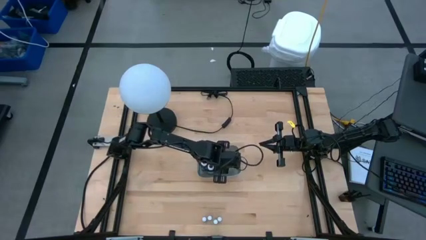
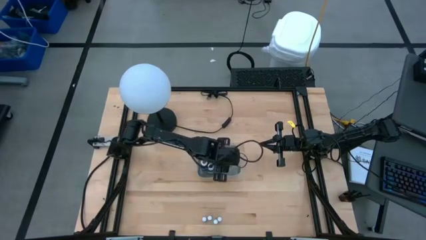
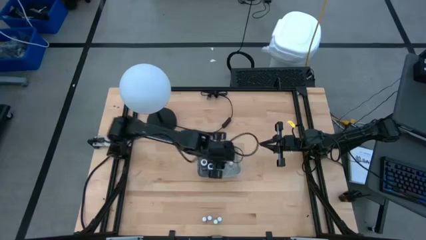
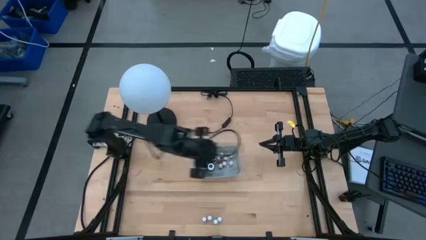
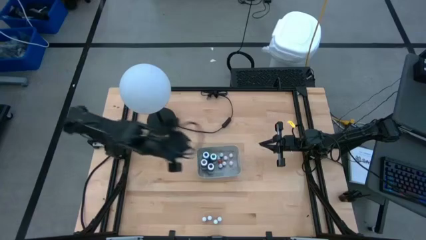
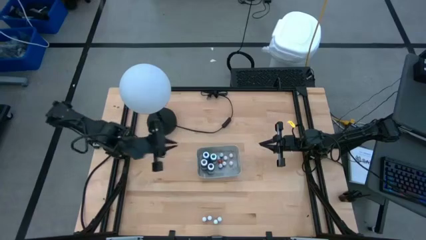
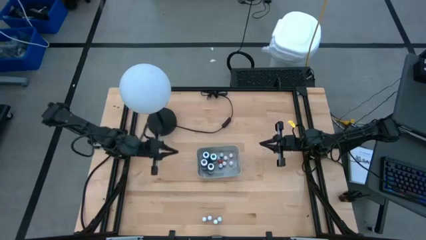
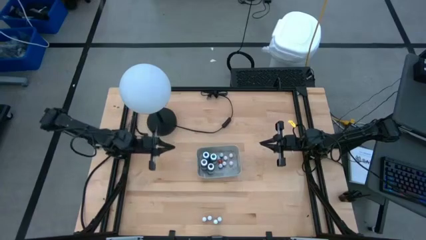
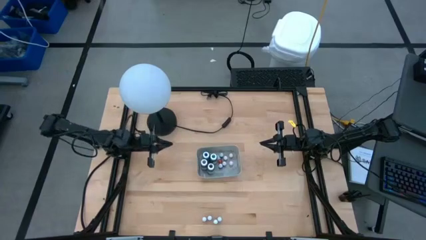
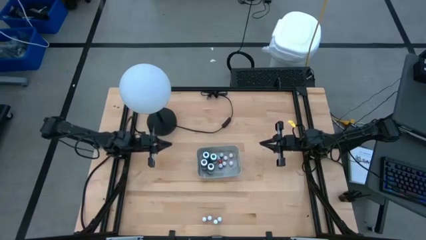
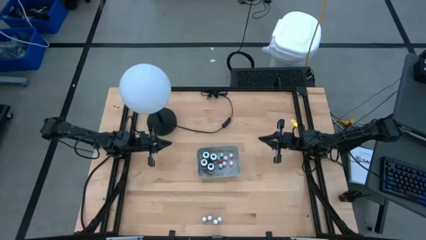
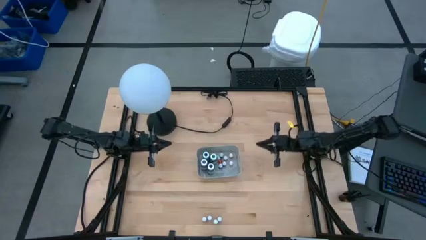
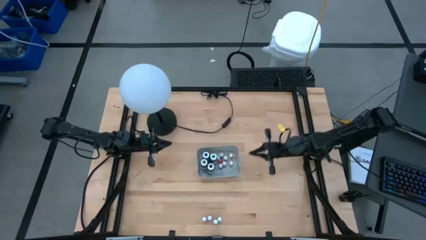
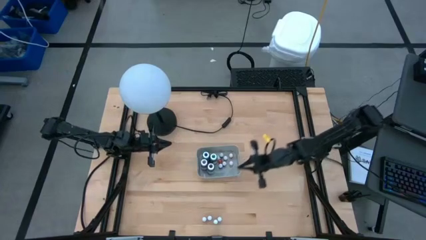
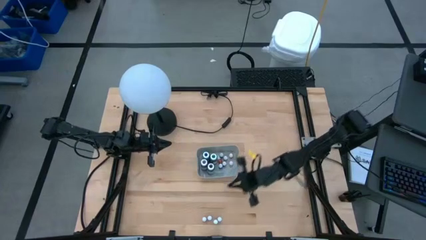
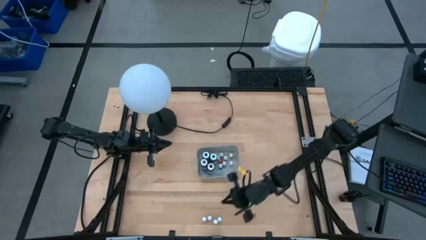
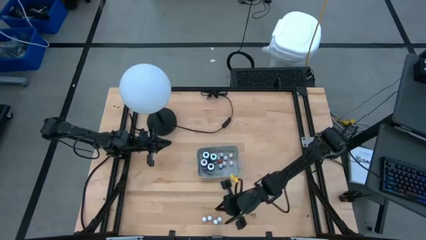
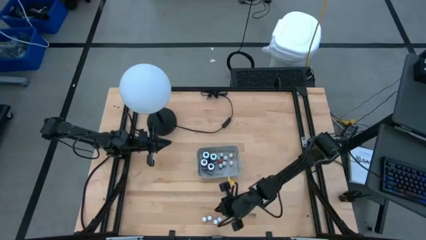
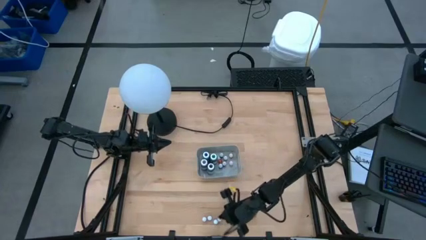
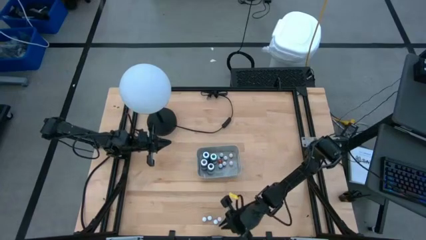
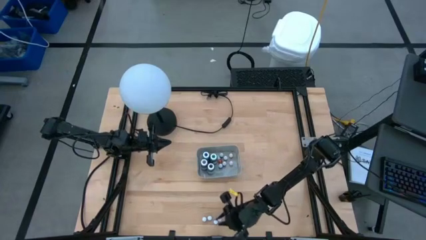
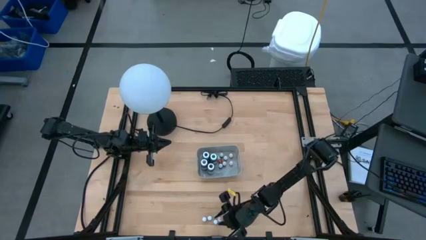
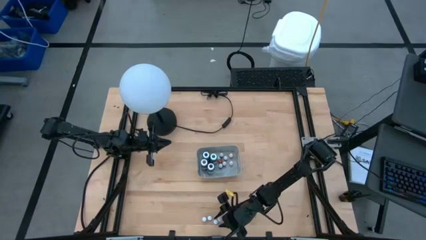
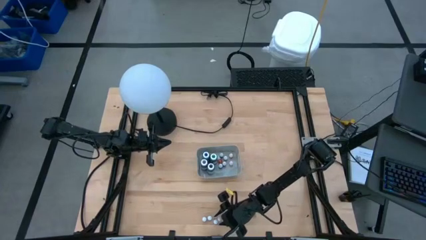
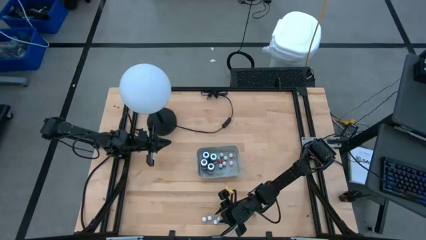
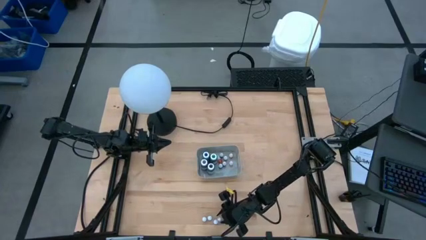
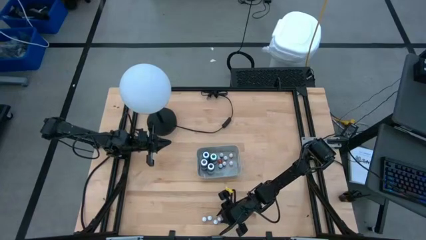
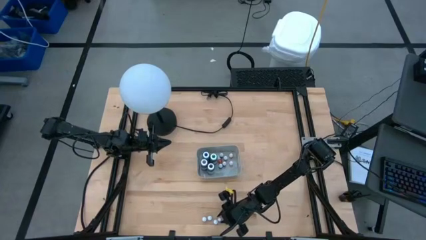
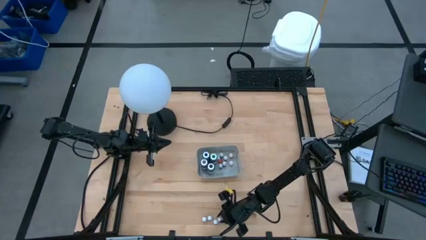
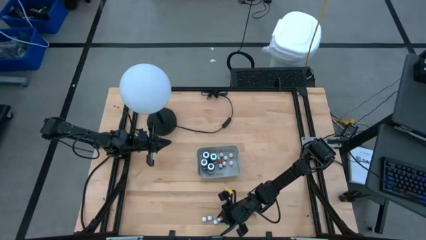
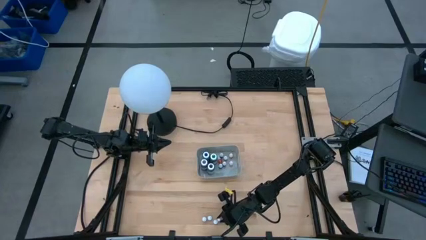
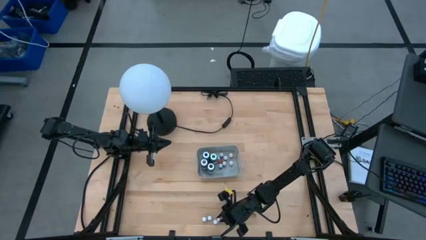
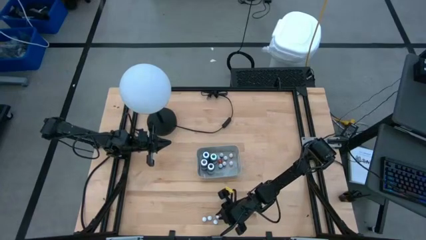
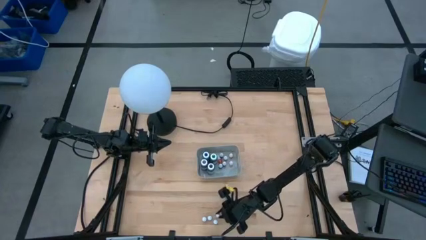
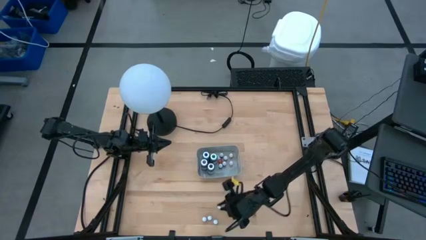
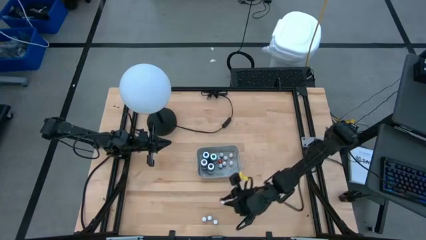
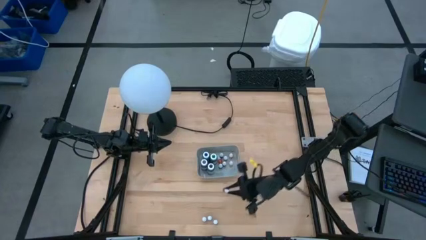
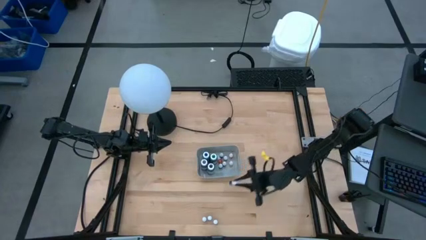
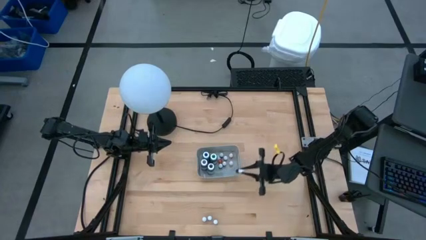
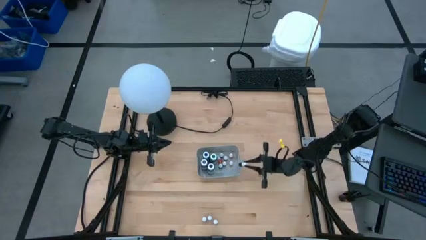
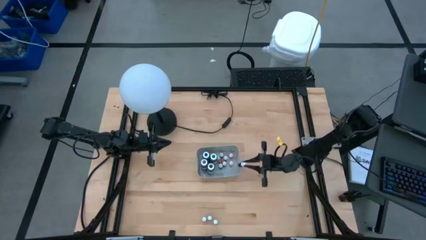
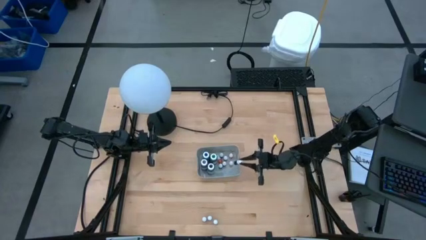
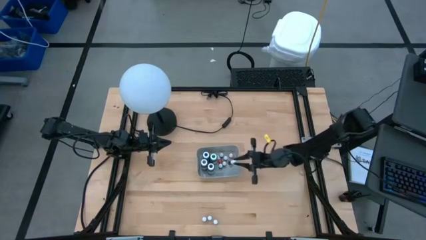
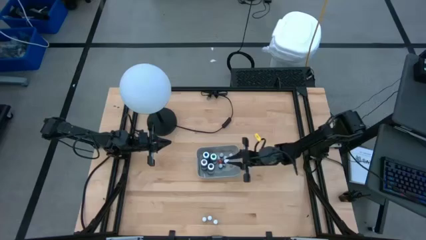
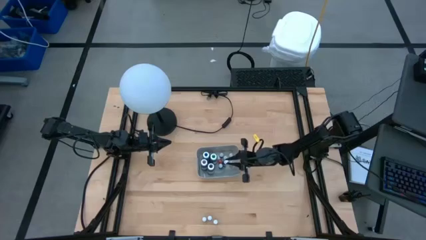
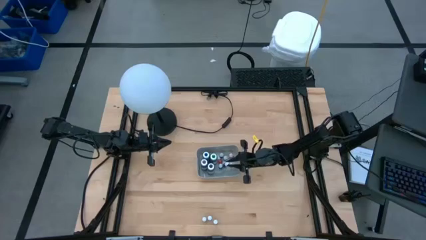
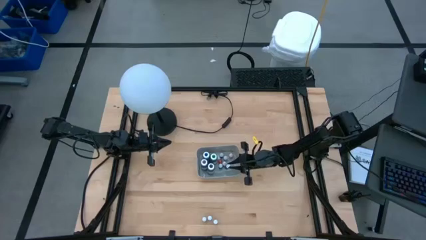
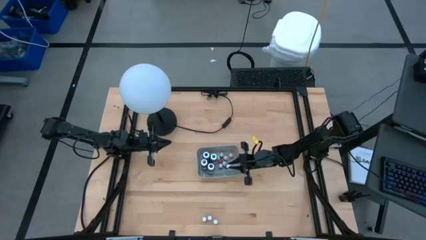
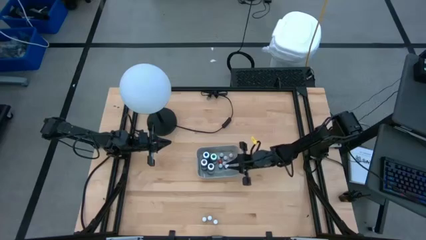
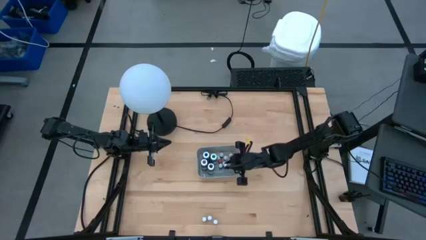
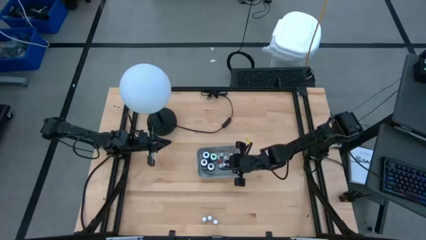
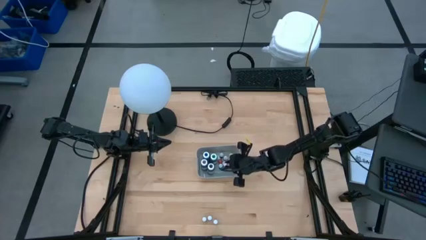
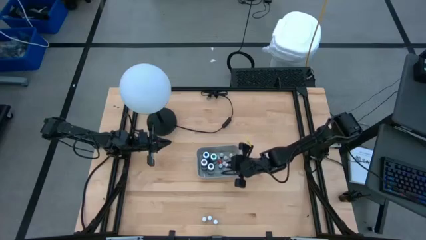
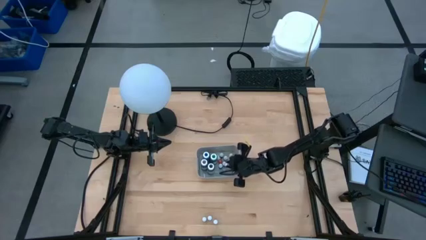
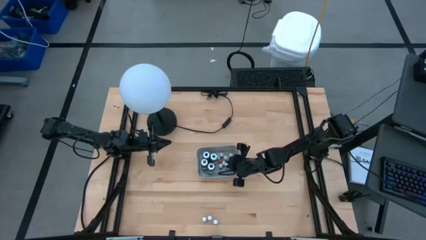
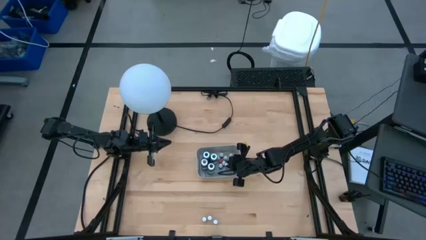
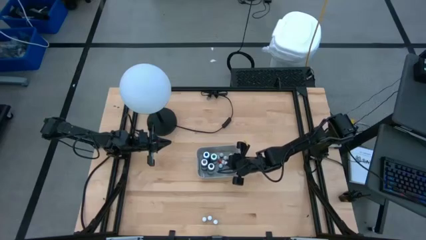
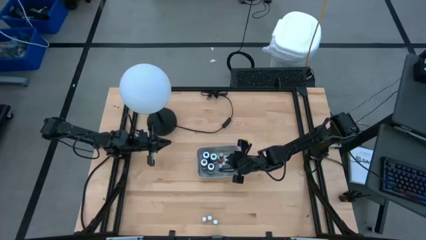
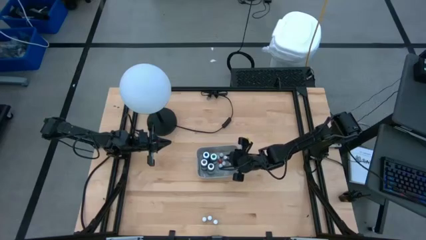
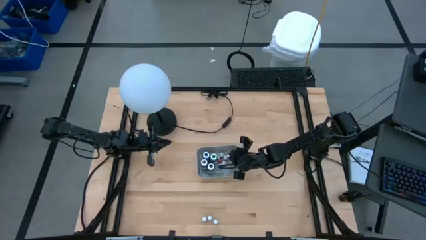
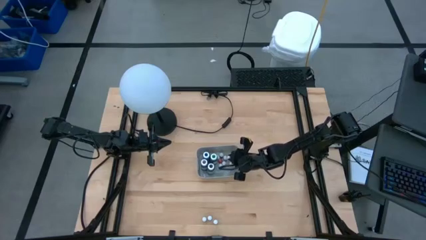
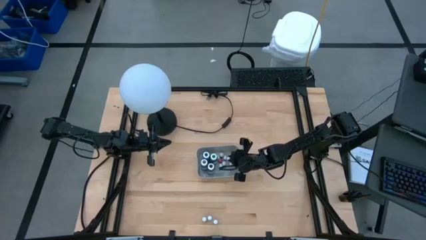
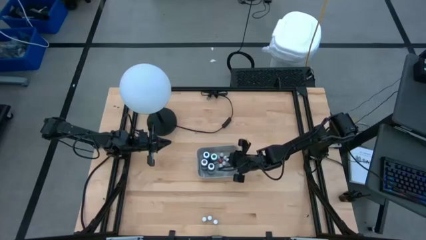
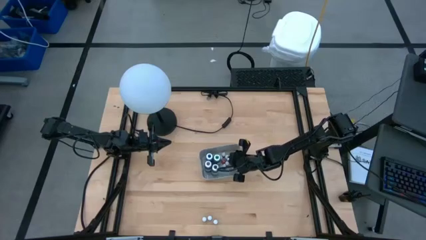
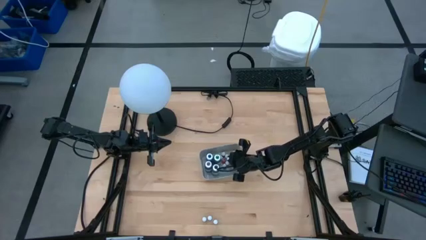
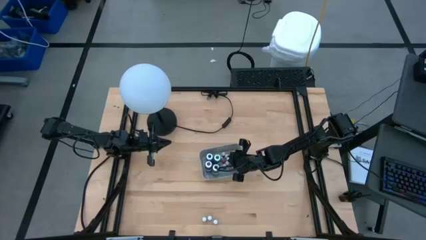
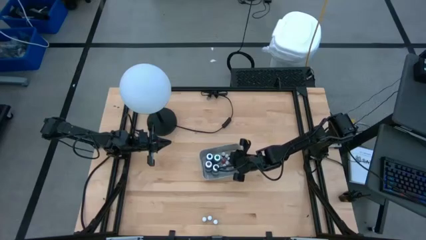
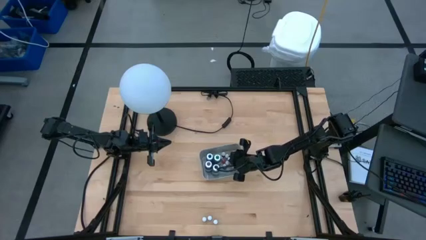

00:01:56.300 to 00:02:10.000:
Task: Pick & Place food coloring
Put the small dark blue food coloring bottle into the gray bin

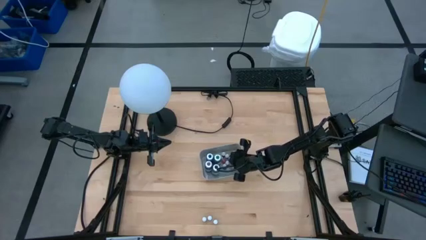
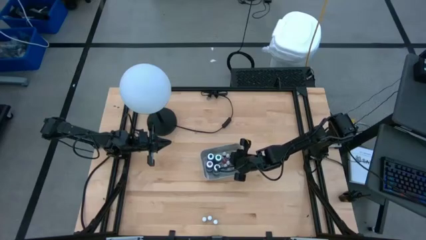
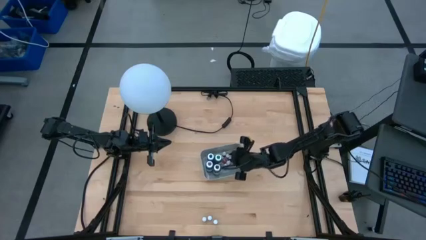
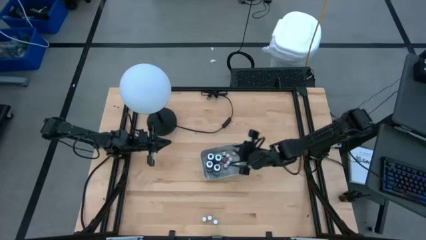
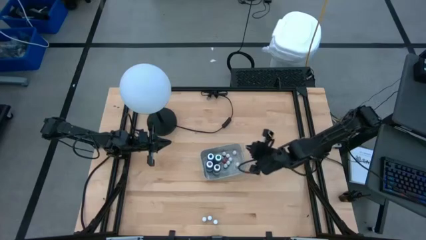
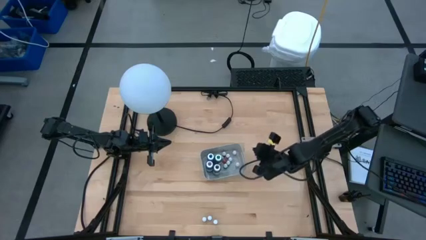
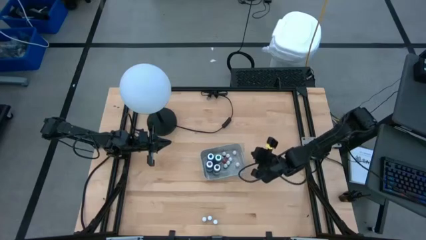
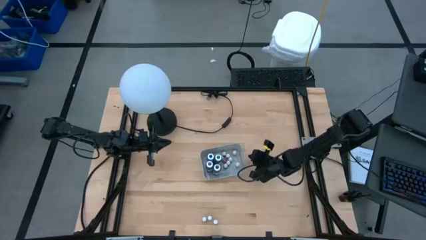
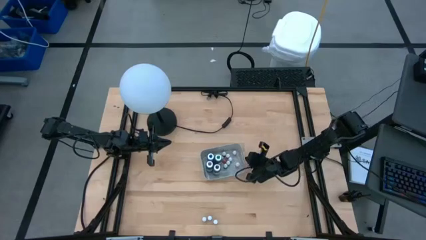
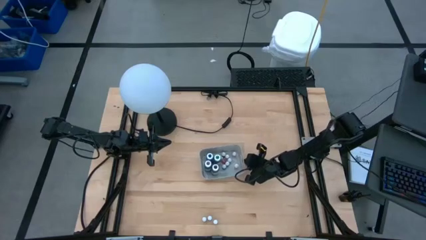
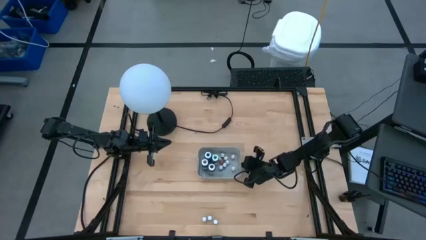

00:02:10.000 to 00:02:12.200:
Adjust the gray bin
